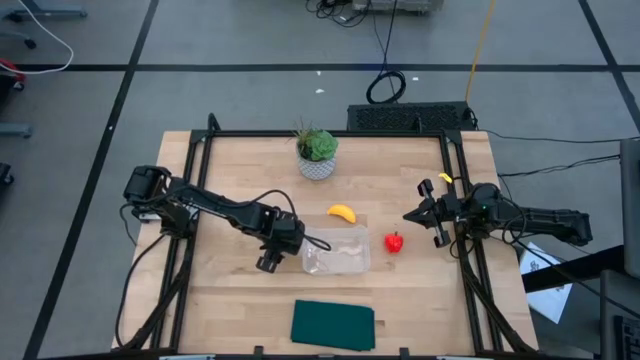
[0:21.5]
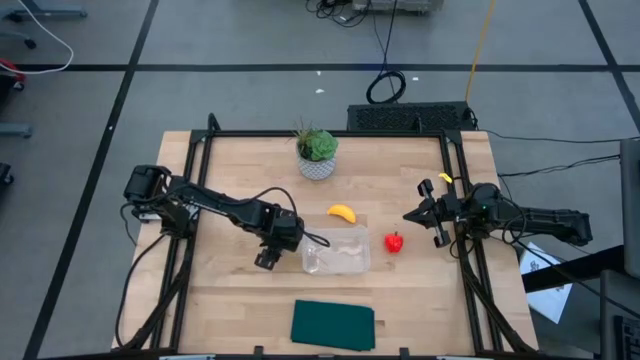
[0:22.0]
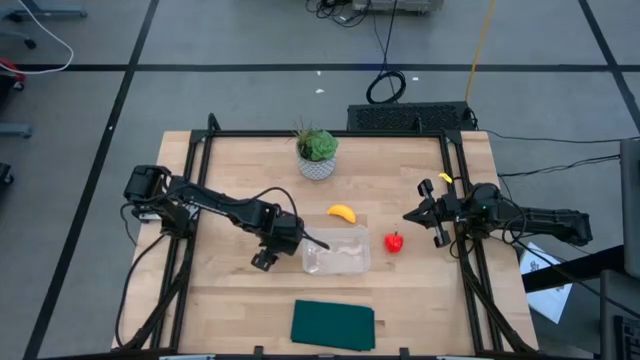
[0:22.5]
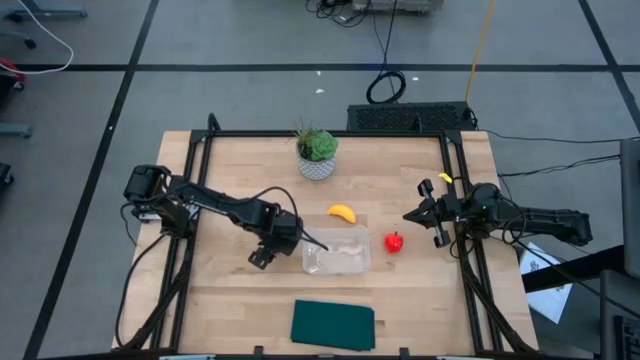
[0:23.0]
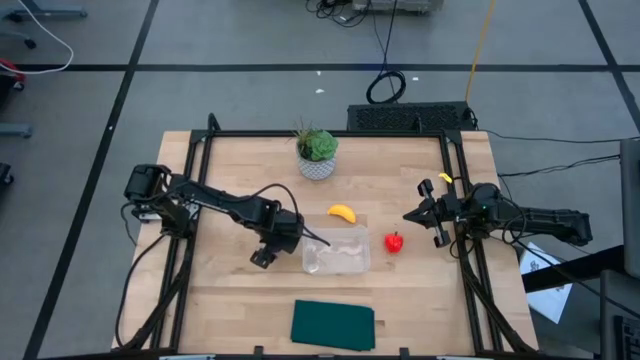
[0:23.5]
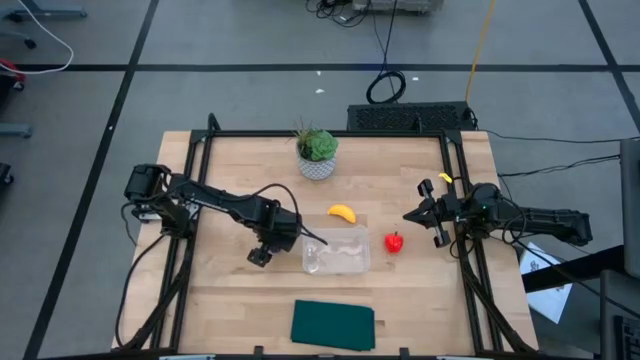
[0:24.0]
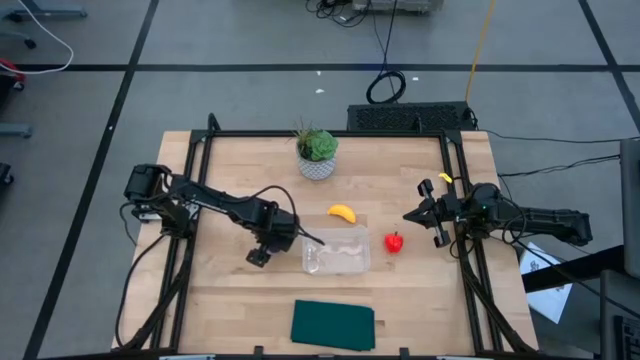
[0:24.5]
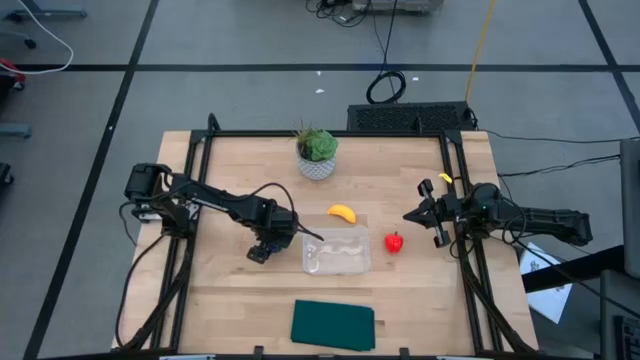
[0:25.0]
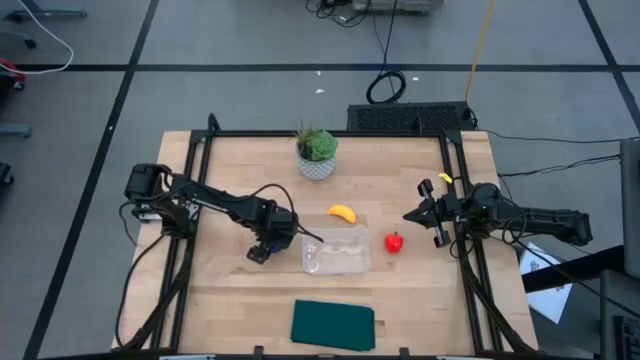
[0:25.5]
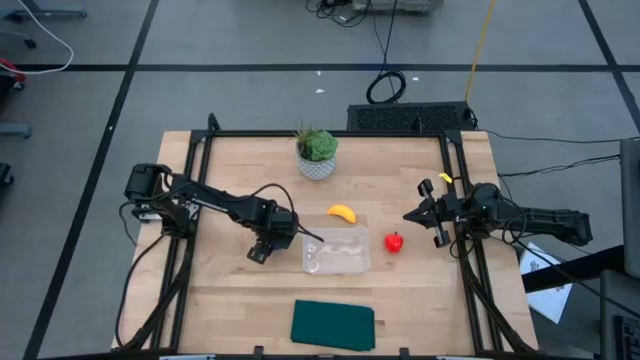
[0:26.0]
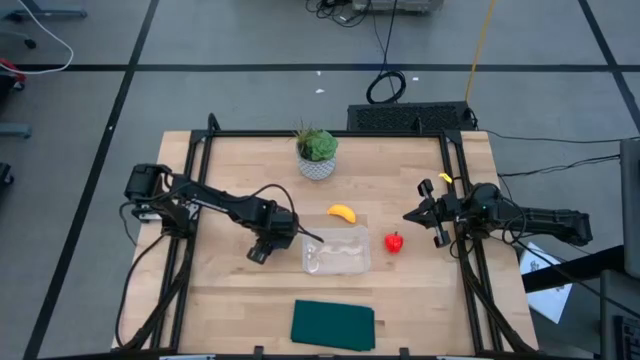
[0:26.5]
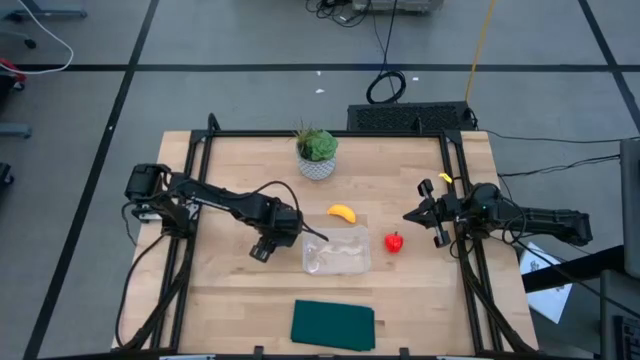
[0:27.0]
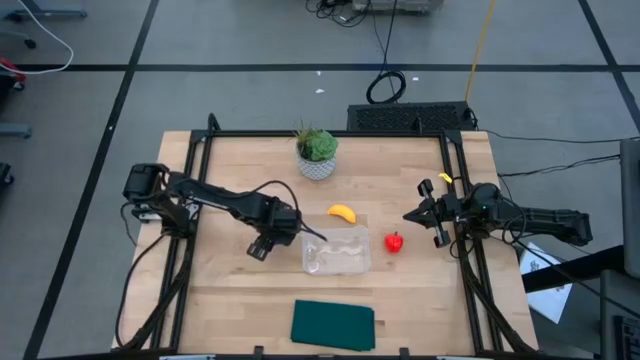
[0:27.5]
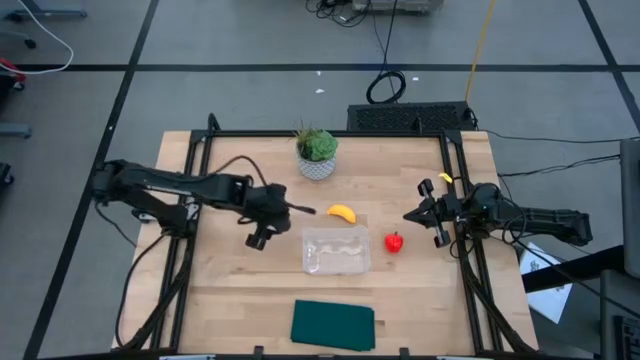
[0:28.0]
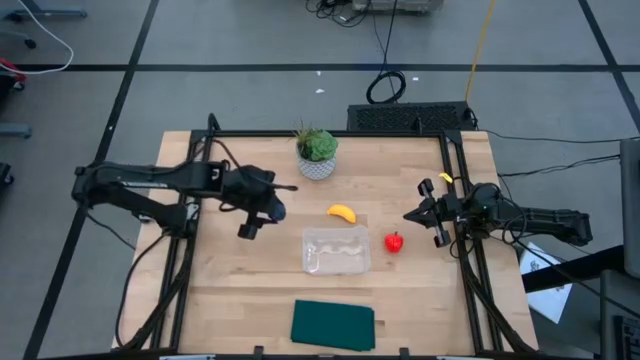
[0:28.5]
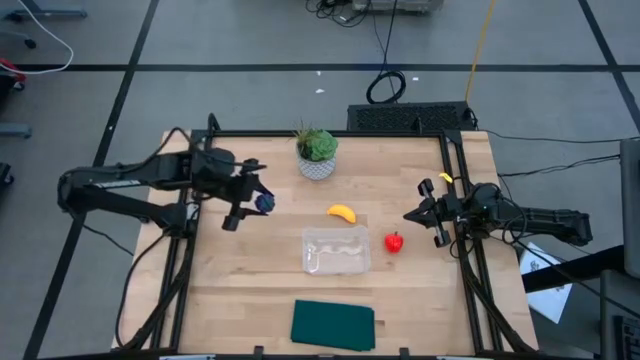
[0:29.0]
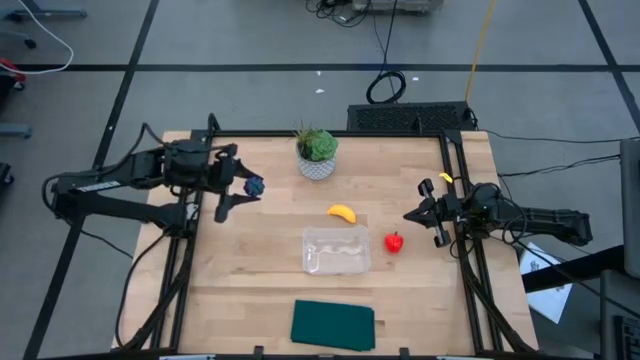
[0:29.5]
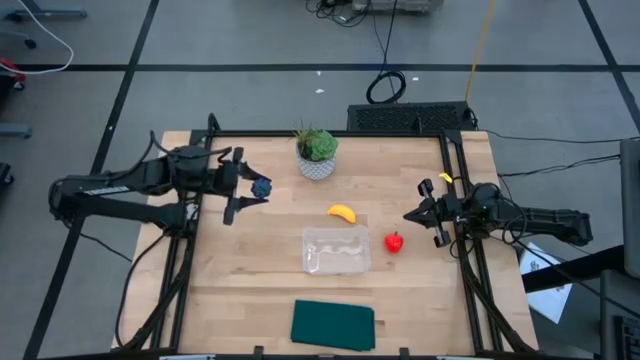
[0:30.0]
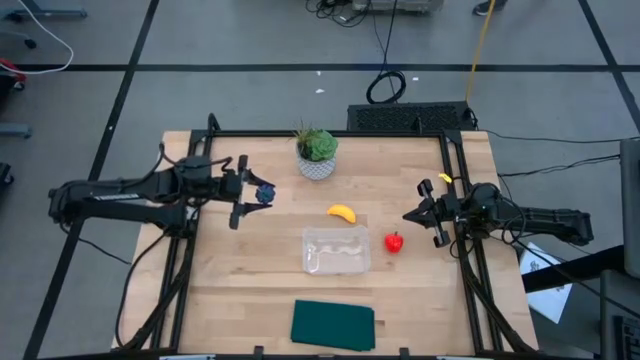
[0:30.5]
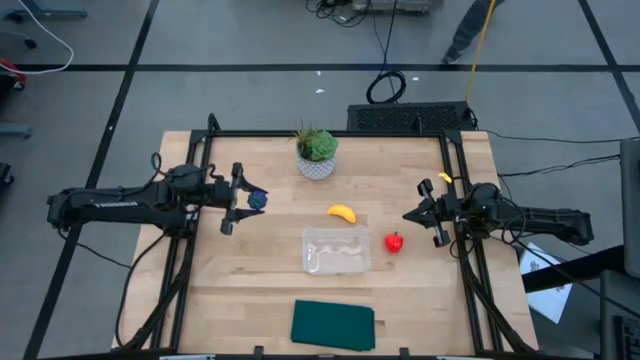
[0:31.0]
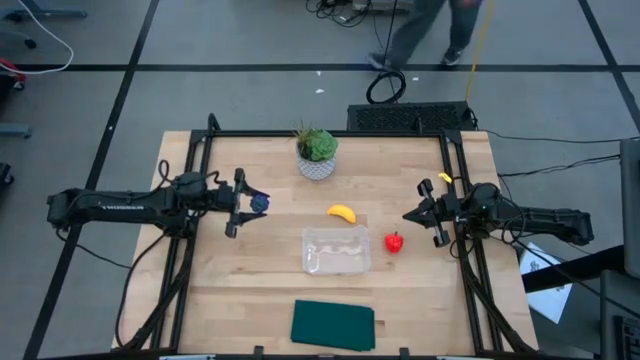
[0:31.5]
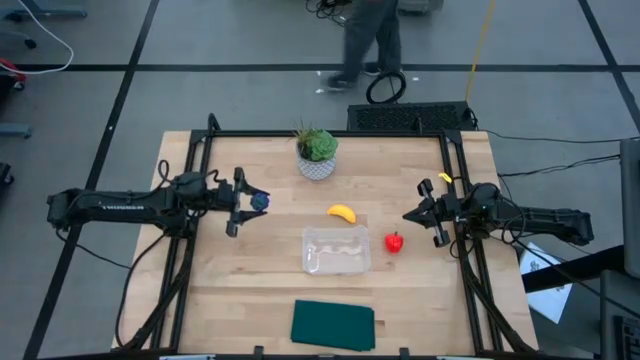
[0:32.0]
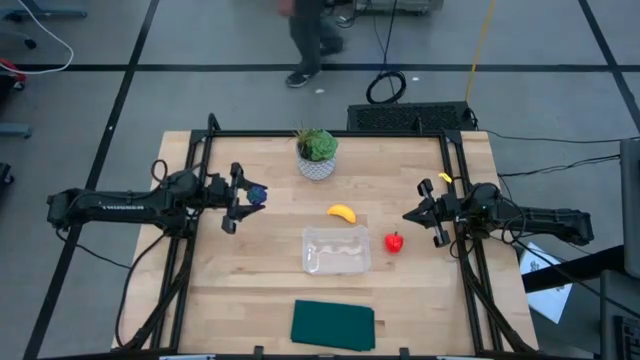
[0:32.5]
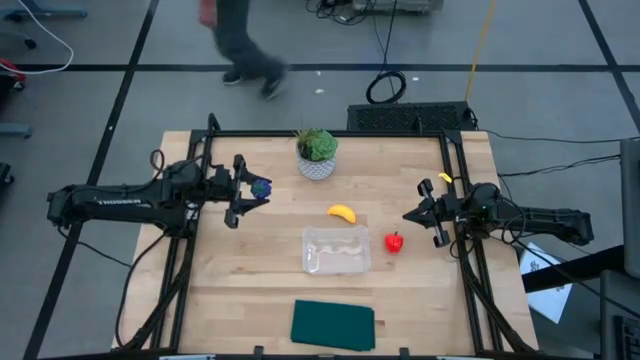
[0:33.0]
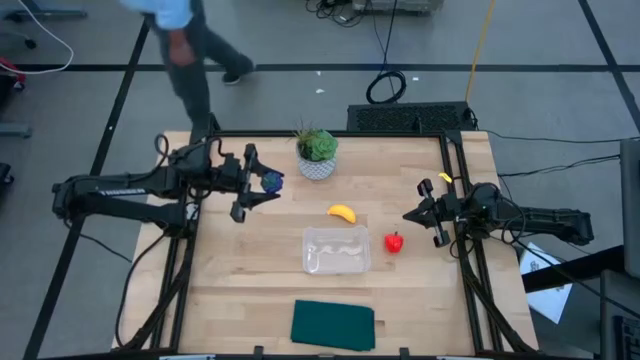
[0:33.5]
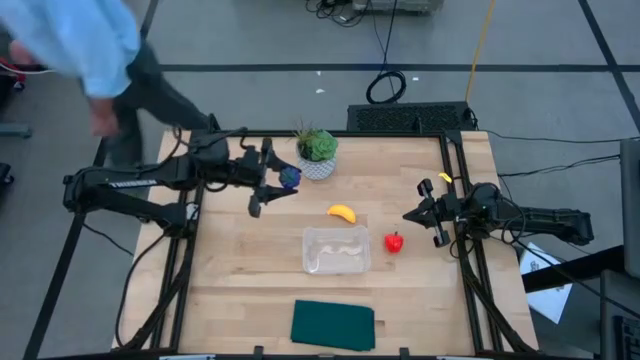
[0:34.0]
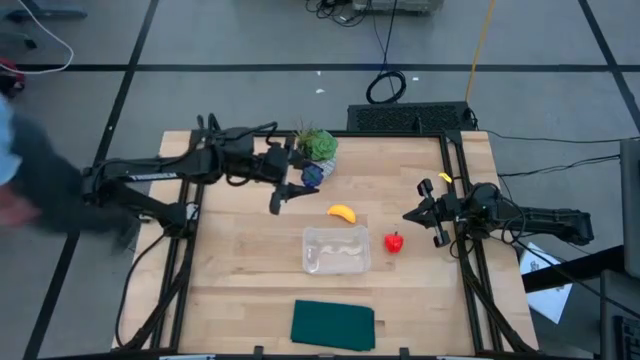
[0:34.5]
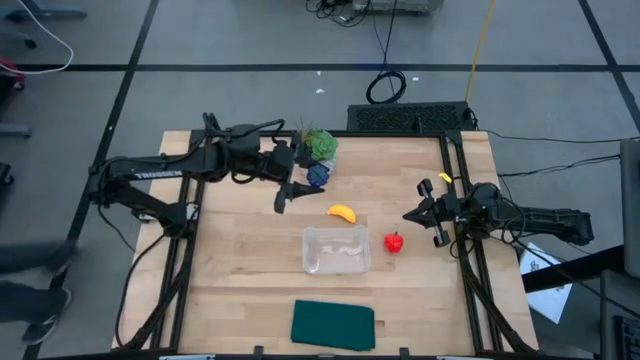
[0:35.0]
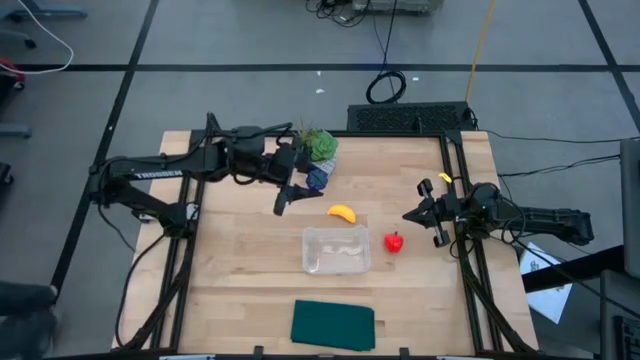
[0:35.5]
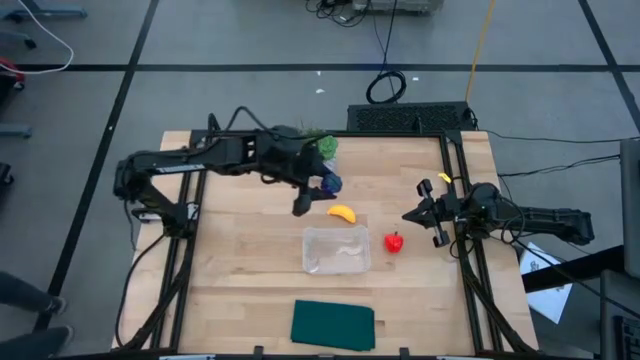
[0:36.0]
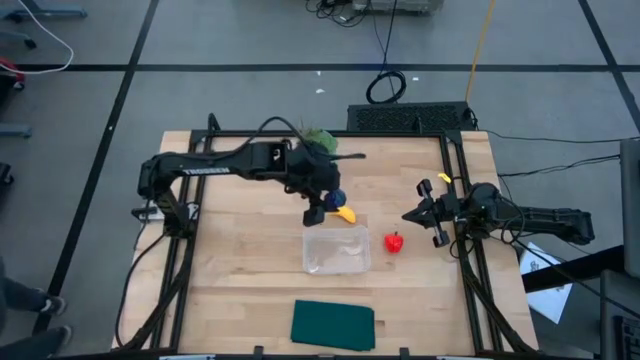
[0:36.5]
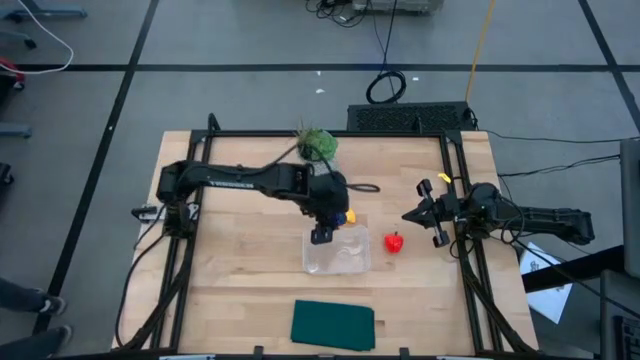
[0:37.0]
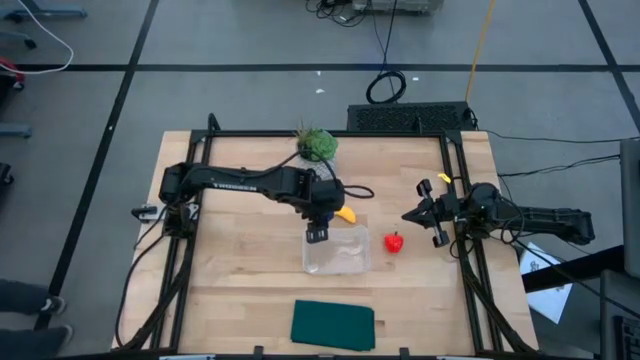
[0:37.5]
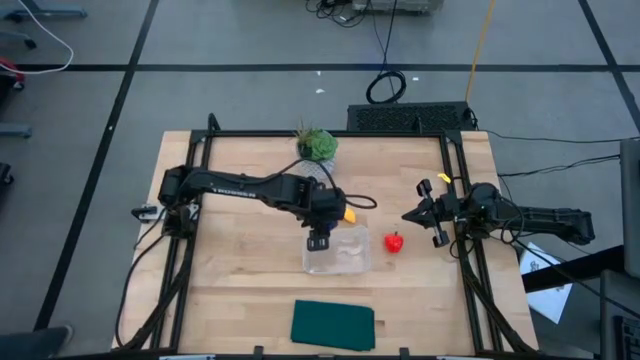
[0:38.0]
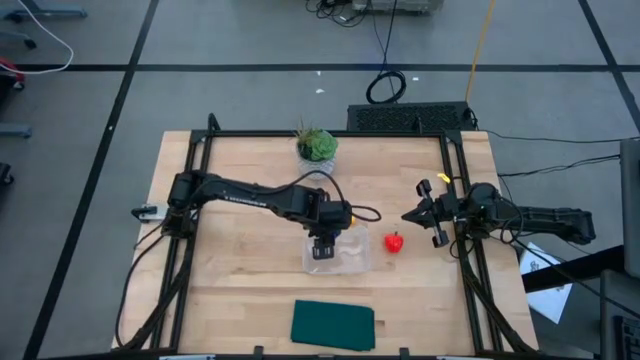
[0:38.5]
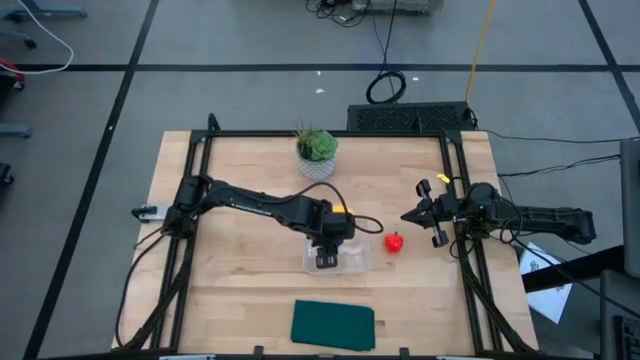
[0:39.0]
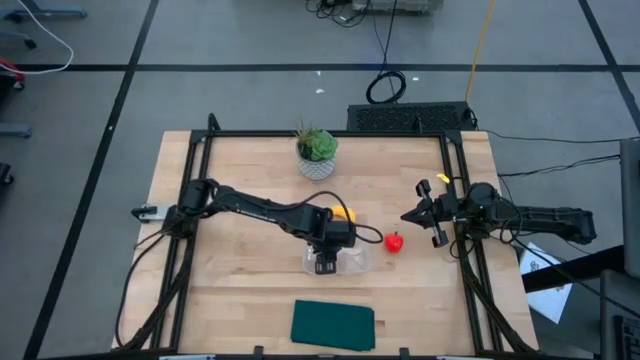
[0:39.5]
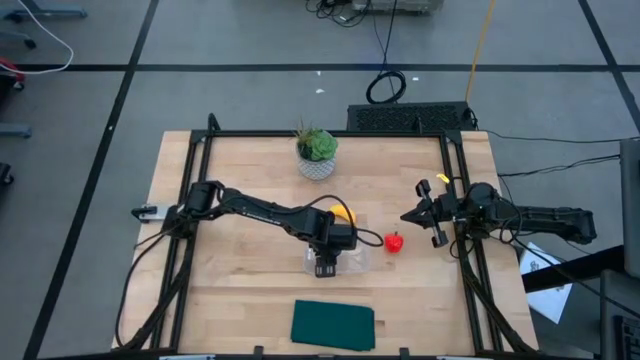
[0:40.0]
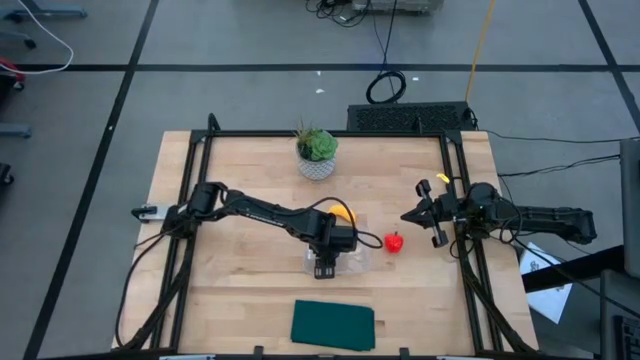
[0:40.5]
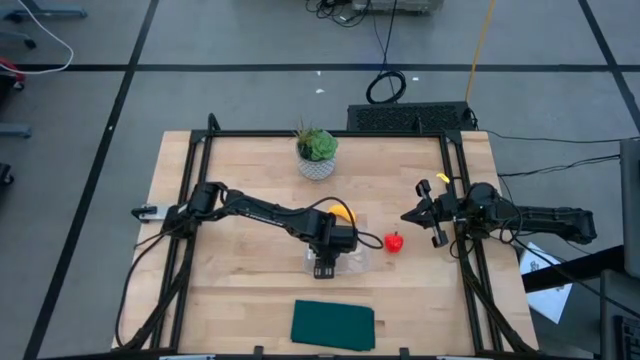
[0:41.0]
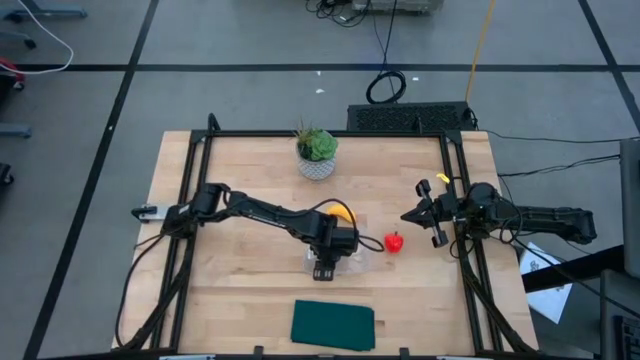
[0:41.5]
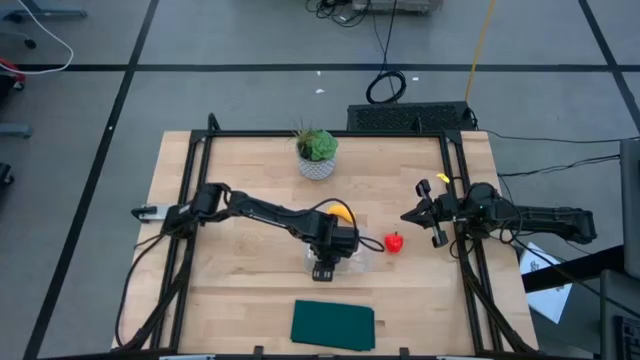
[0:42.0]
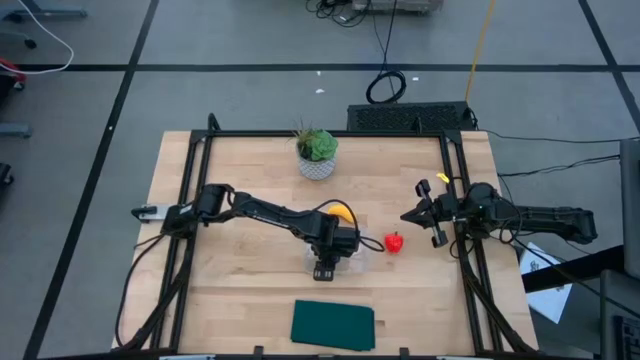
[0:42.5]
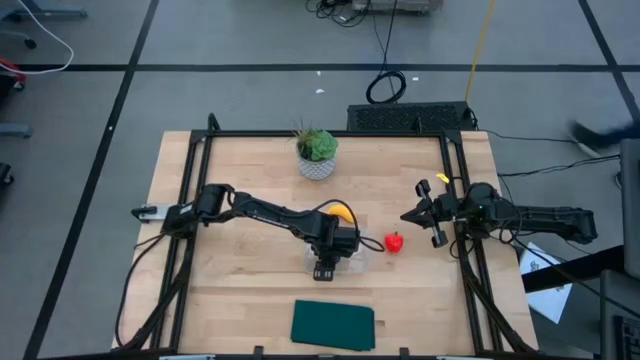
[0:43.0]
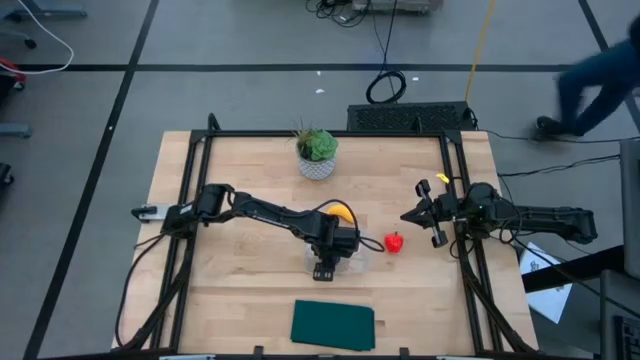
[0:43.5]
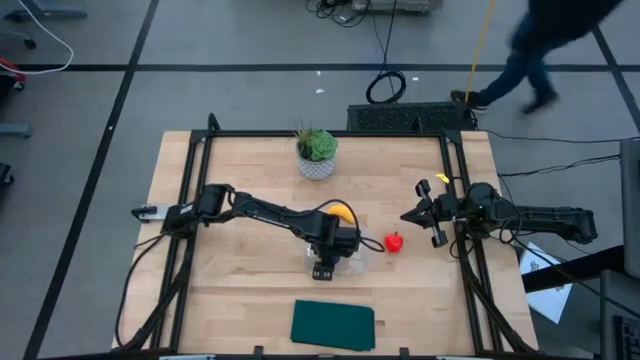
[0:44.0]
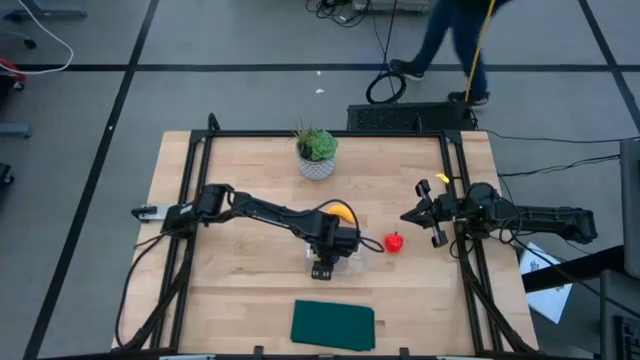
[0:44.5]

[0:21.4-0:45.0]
Task: Pick and placing Produce into tupperware
Put the grapes into the transparent bin
